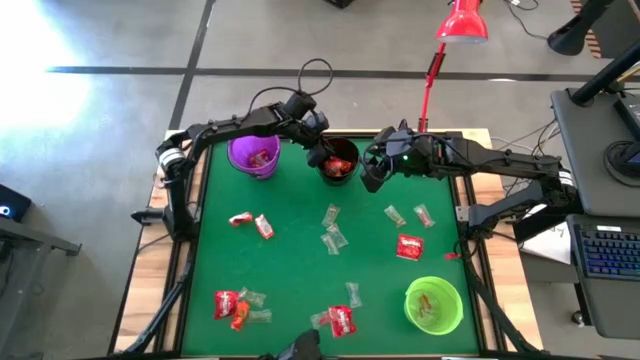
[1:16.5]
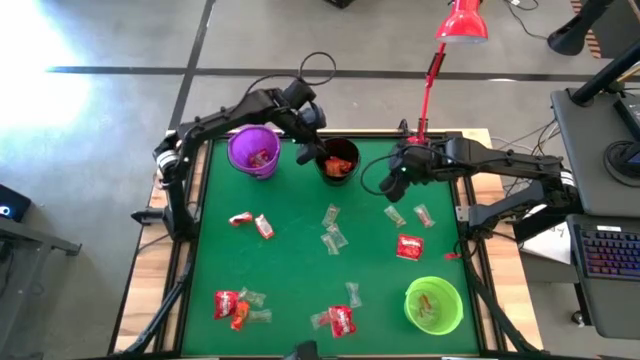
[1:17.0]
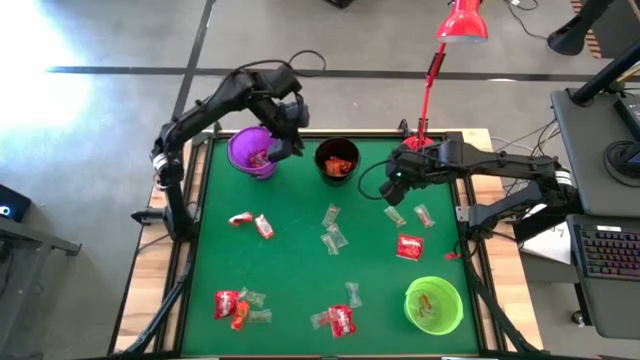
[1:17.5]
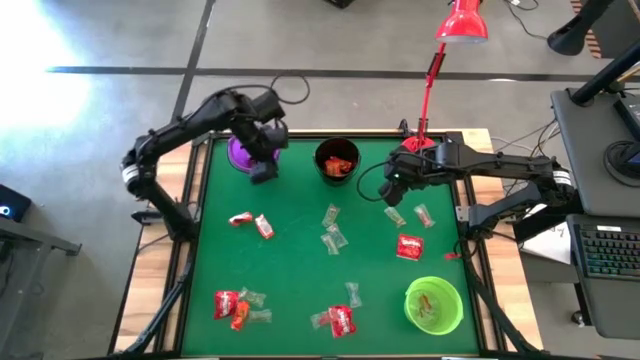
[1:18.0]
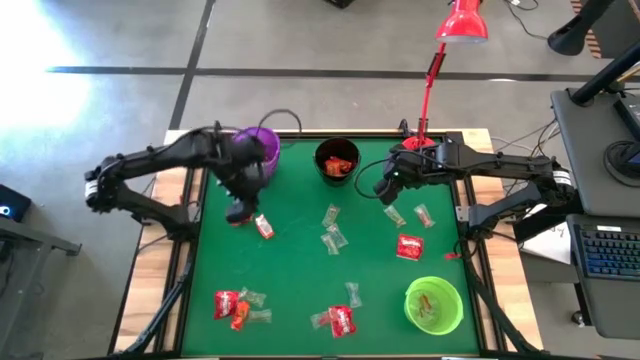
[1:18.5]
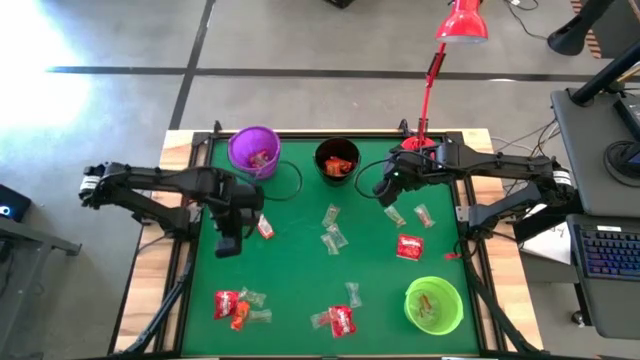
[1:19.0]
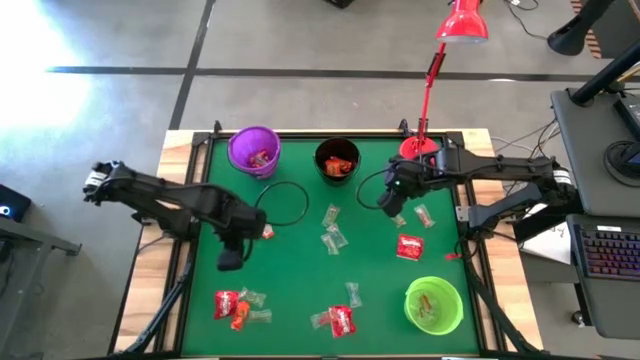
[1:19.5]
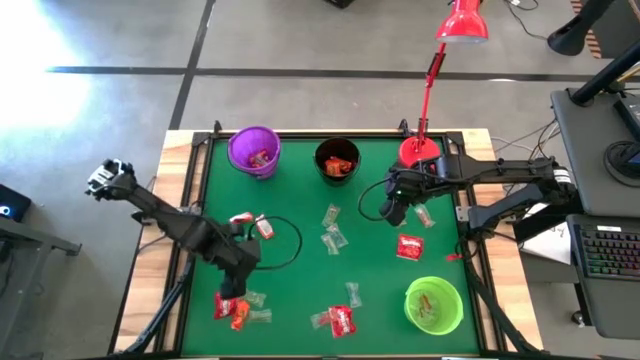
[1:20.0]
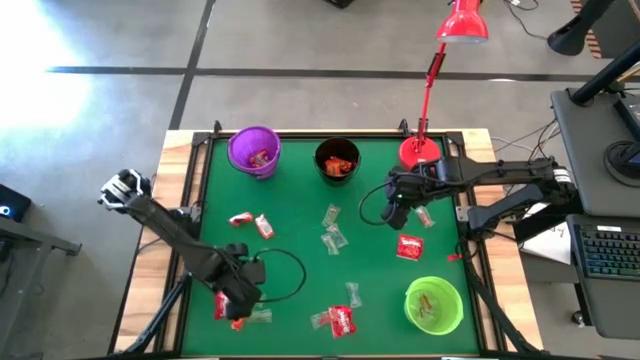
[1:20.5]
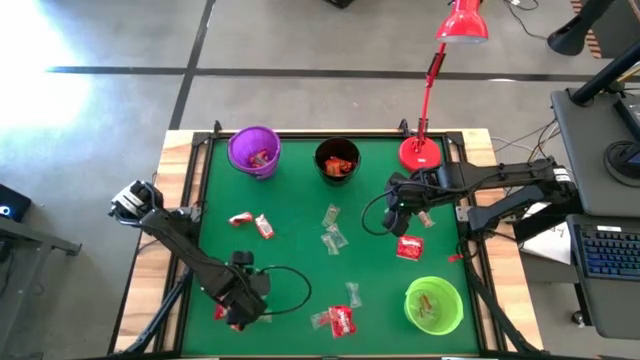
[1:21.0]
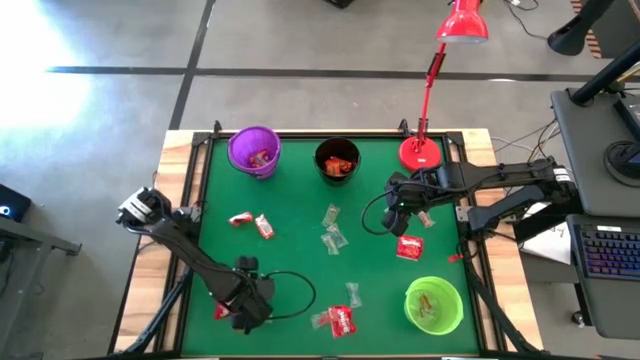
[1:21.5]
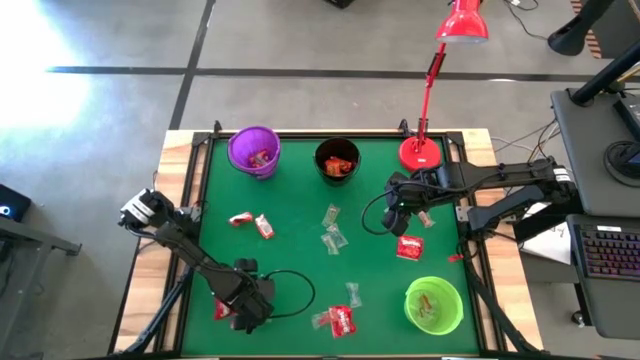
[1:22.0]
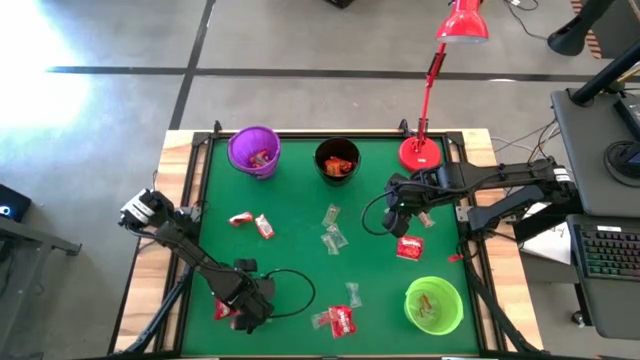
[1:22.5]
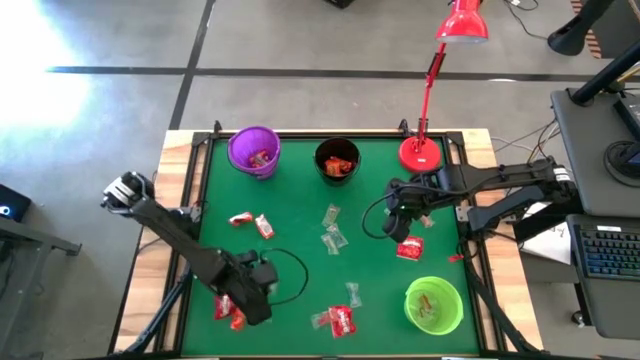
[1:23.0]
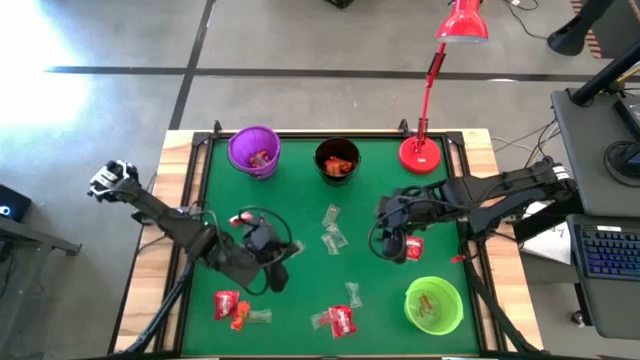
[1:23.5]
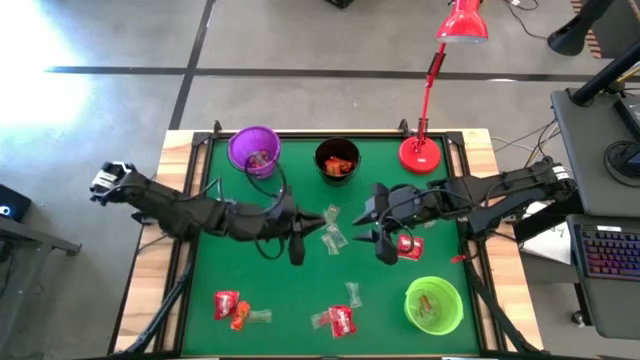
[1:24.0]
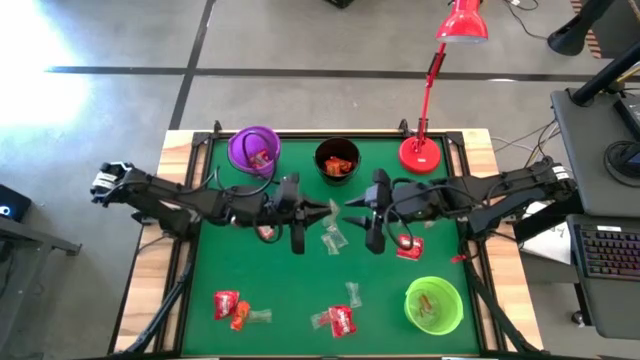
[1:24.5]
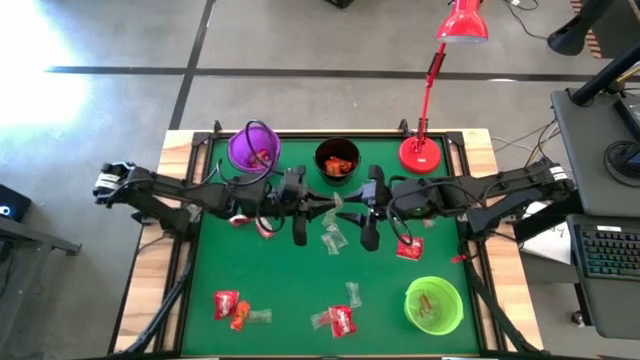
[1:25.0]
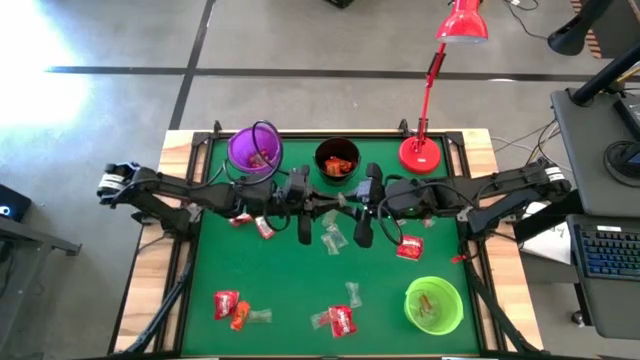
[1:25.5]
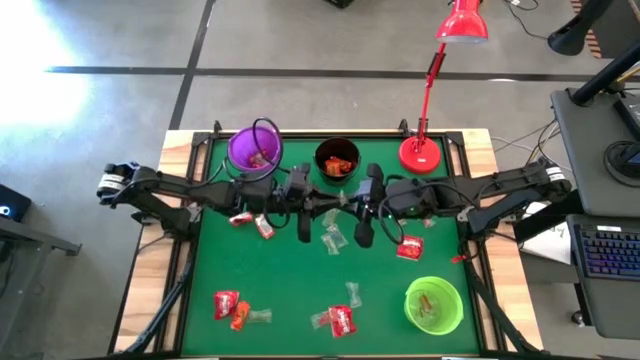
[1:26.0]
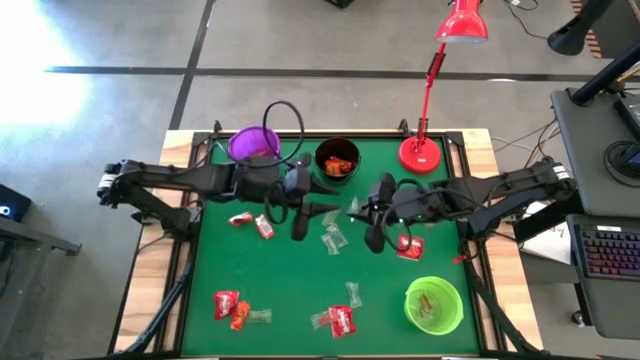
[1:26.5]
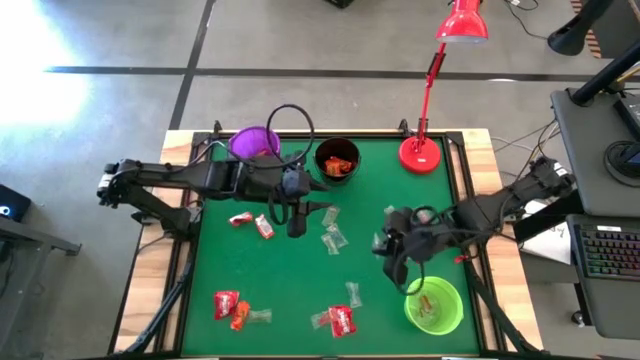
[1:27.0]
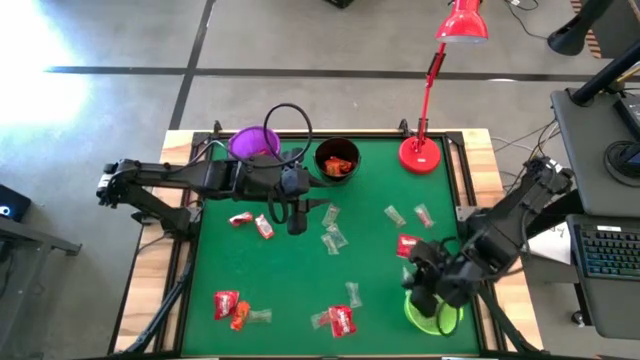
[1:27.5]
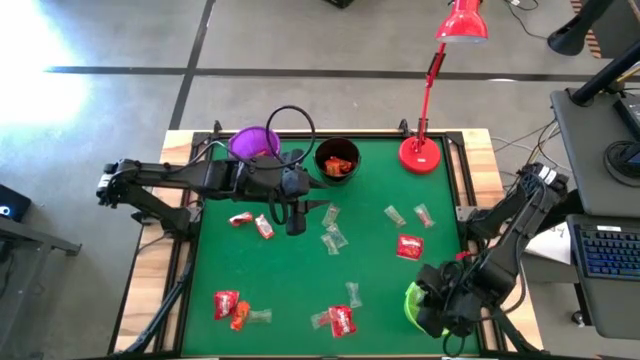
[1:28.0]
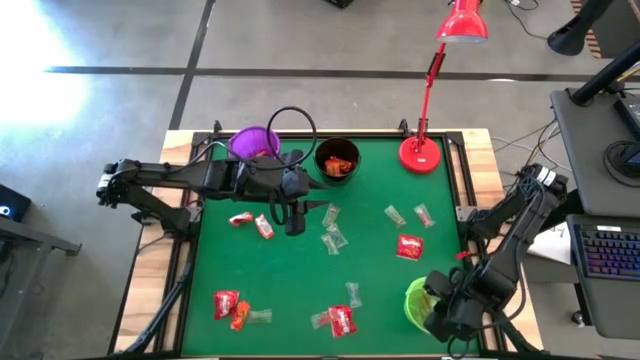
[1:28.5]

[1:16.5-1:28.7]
Task: Sort candy
Put the green gummy into the black bucket

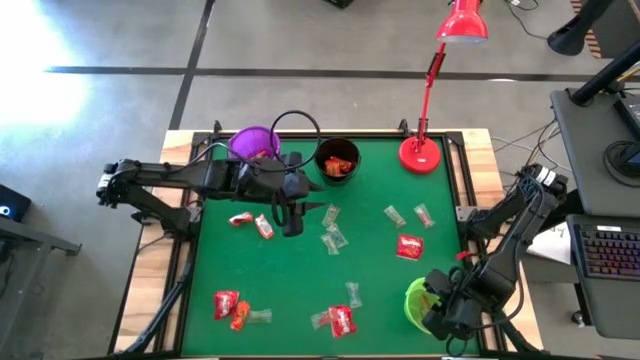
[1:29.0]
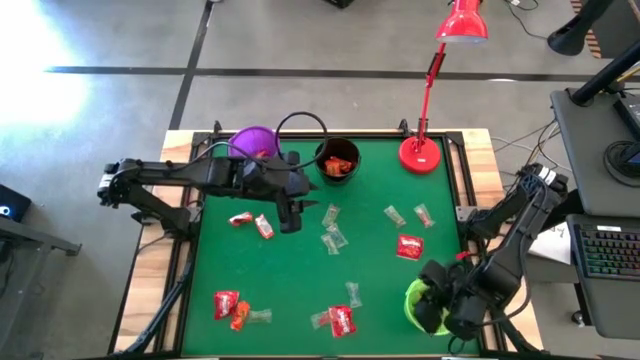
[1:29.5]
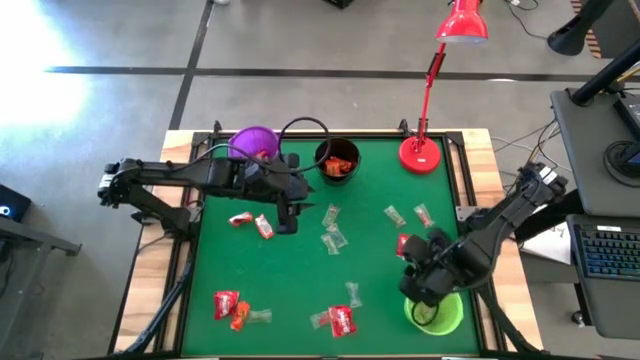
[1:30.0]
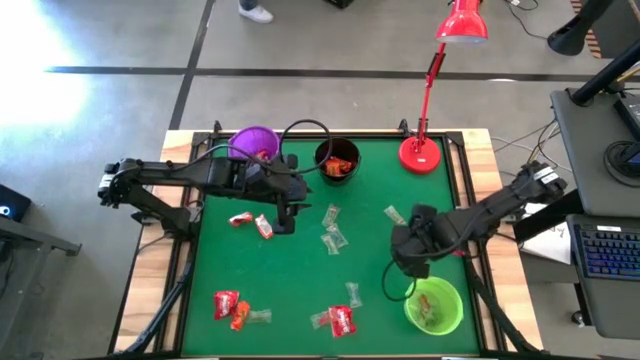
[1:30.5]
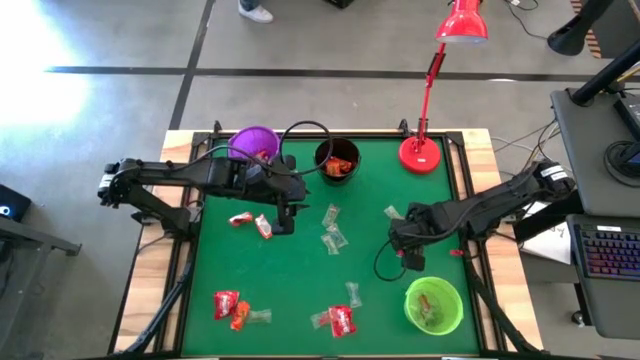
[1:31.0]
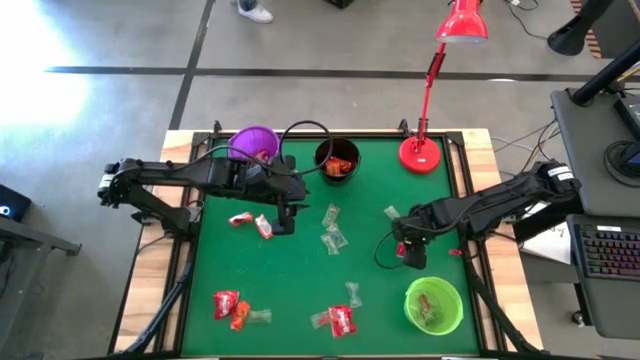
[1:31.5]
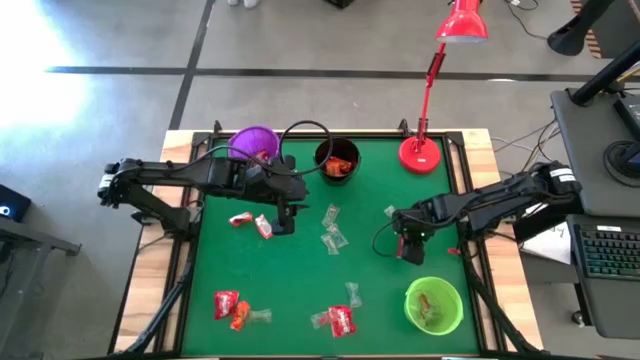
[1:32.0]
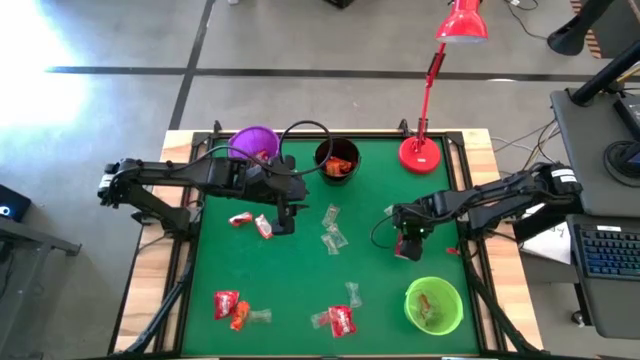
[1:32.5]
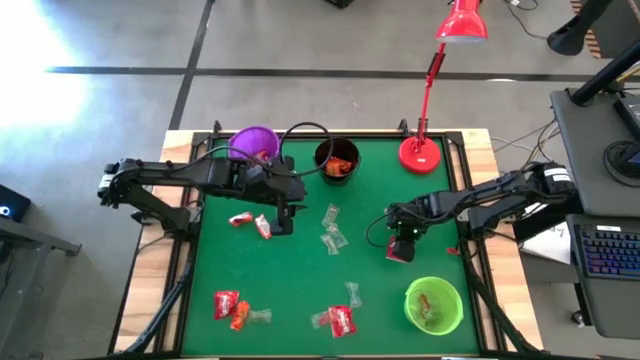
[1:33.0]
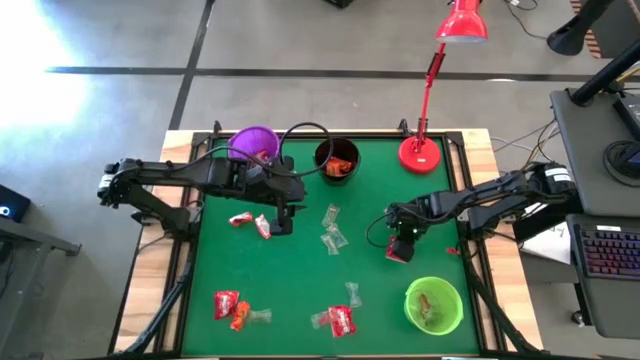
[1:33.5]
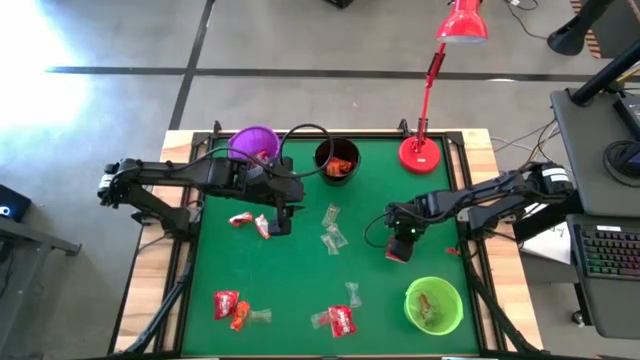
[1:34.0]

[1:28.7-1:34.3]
Put the red candy into the purple bucket

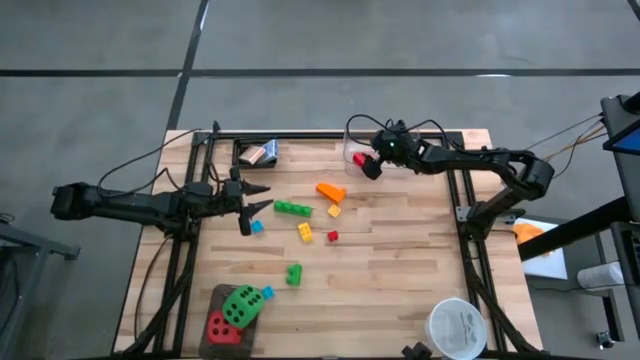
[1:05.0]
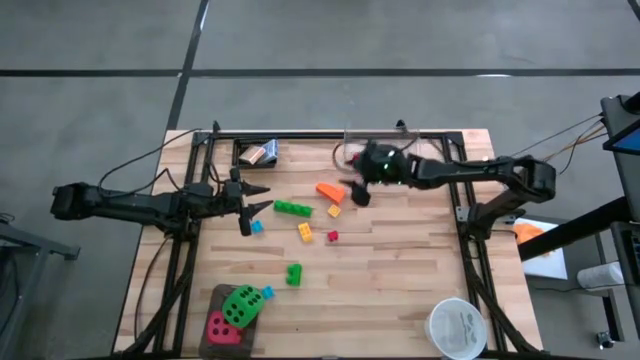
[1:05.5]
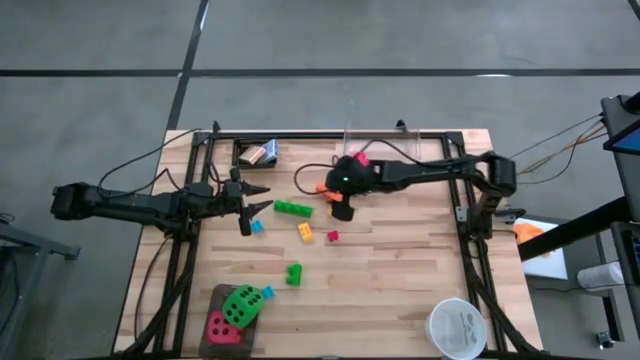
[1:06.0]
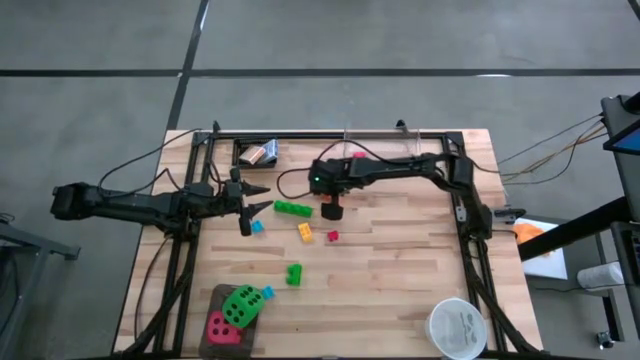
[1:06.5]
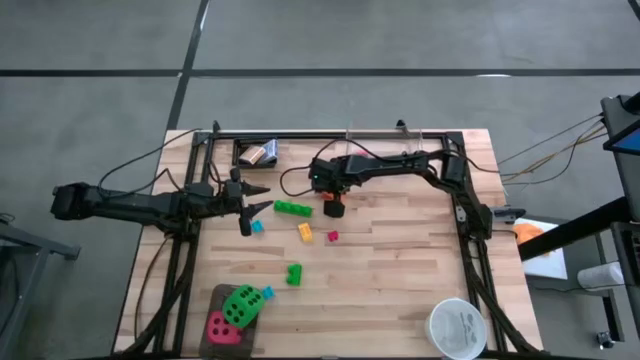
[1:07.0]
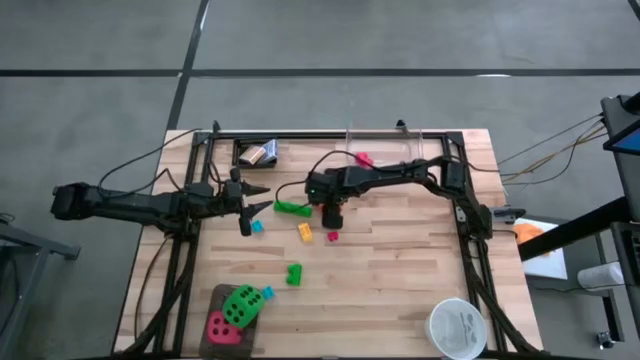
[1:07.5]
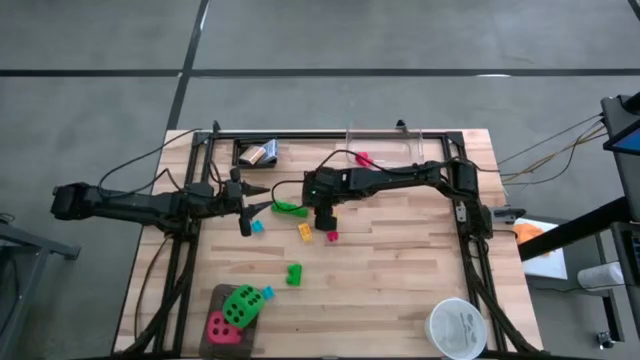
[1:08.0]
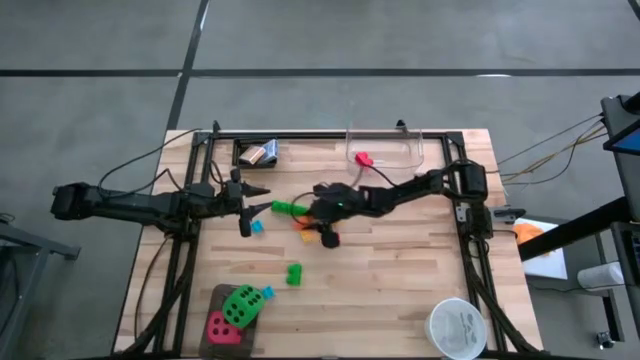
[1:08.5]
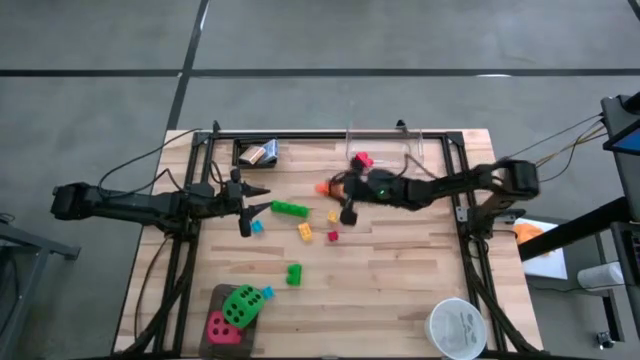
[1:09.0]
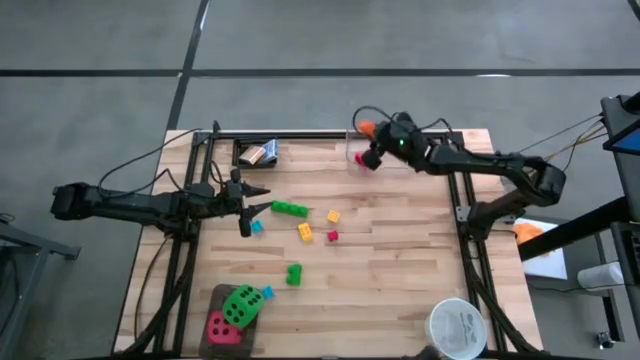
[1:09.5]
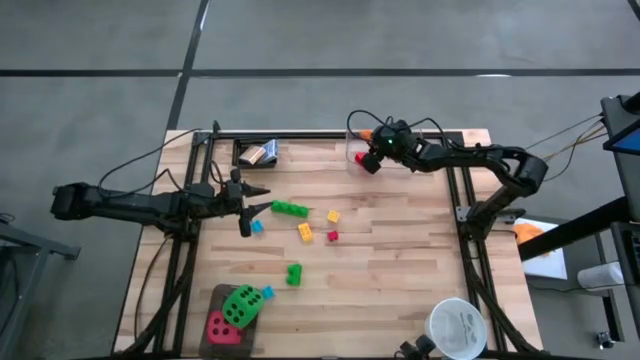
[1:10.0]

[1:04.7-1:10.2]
Task: Pick & Place Toys
Put the orange game piece into the transparent bin
